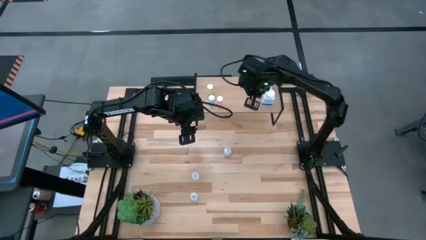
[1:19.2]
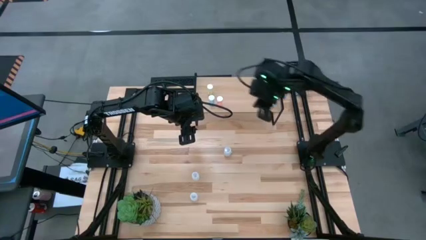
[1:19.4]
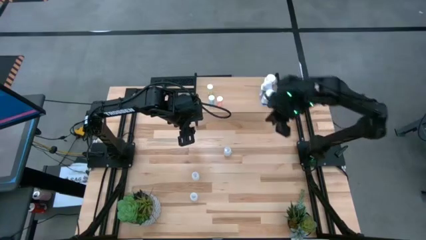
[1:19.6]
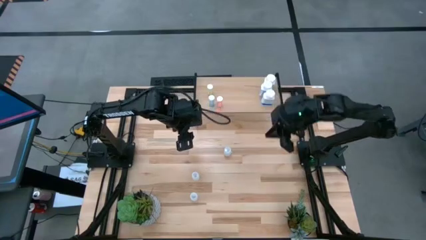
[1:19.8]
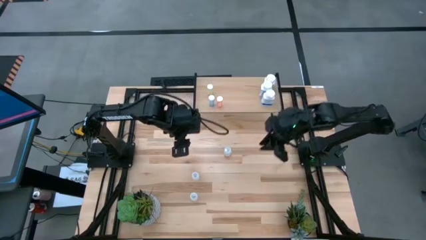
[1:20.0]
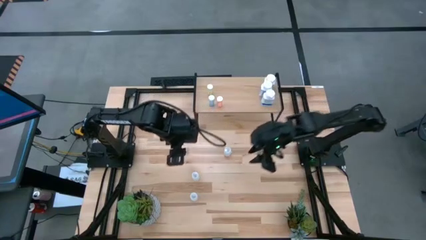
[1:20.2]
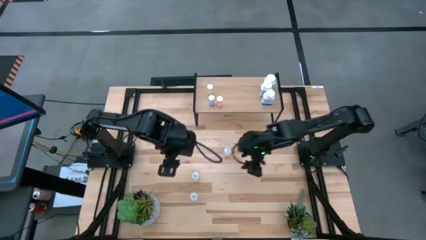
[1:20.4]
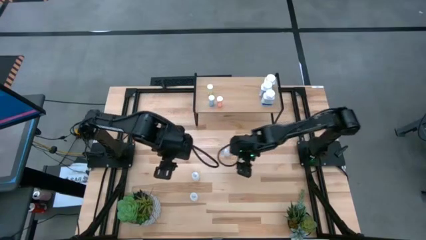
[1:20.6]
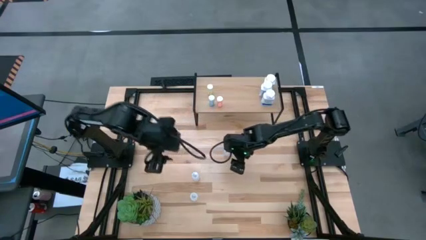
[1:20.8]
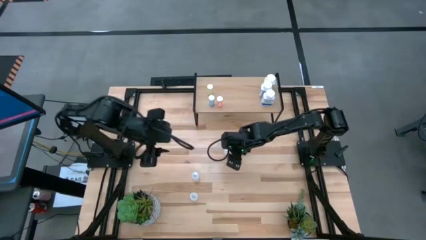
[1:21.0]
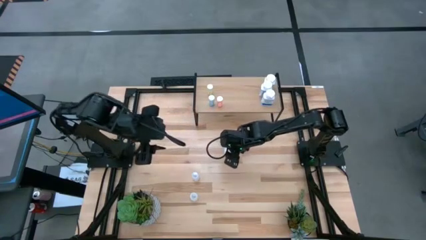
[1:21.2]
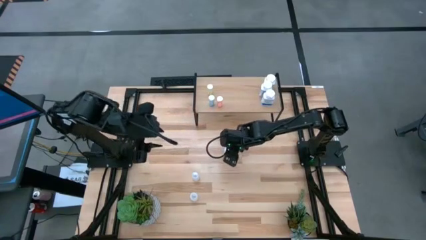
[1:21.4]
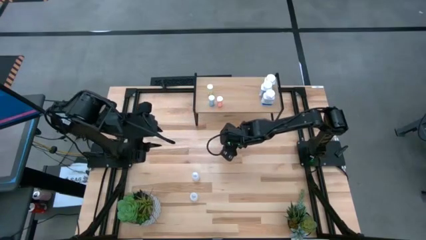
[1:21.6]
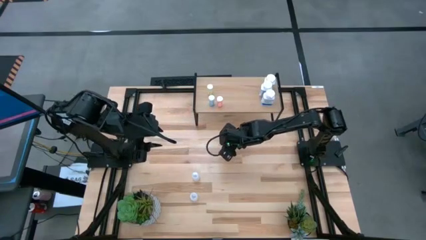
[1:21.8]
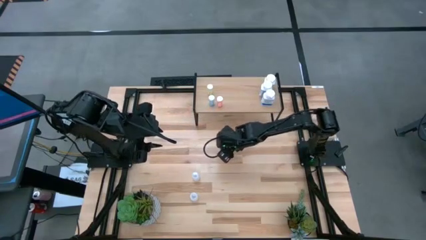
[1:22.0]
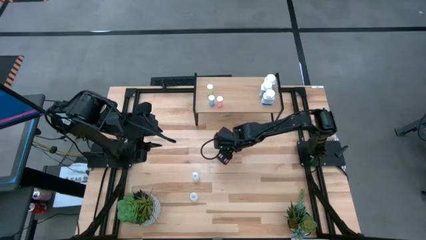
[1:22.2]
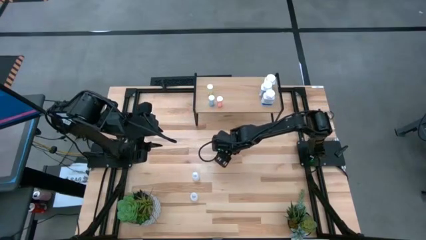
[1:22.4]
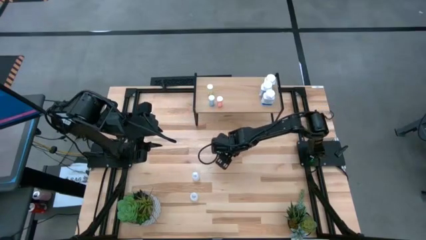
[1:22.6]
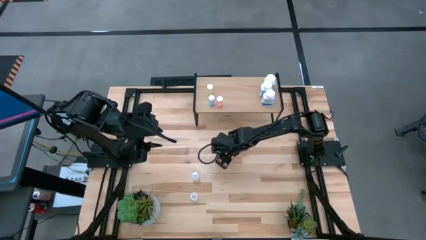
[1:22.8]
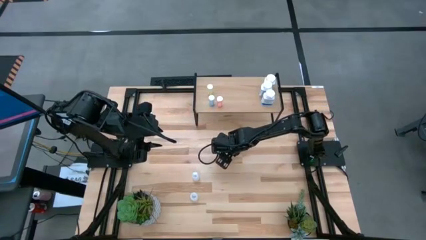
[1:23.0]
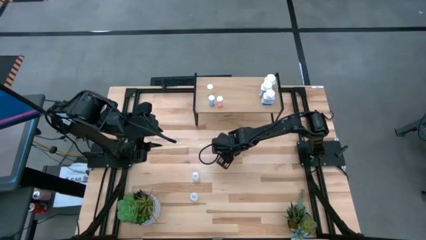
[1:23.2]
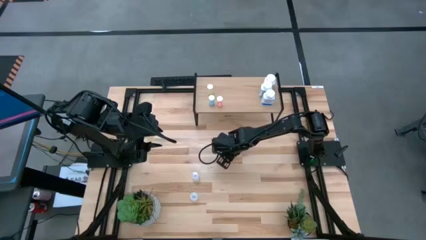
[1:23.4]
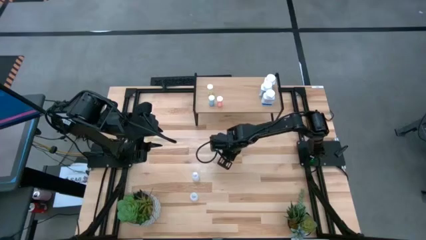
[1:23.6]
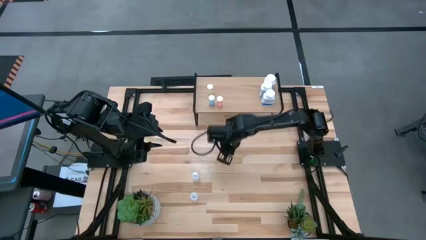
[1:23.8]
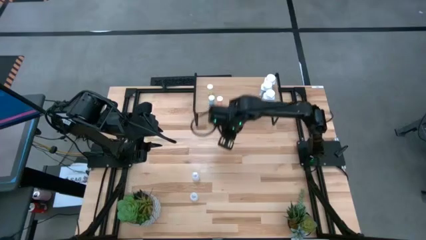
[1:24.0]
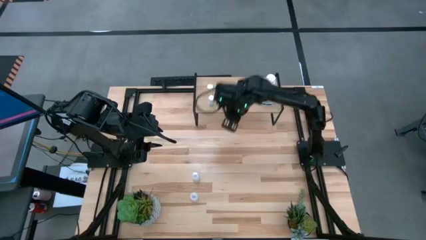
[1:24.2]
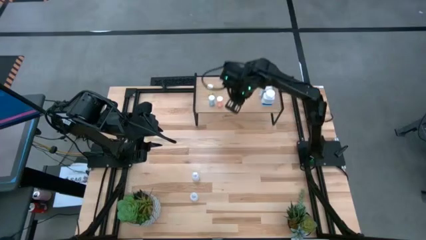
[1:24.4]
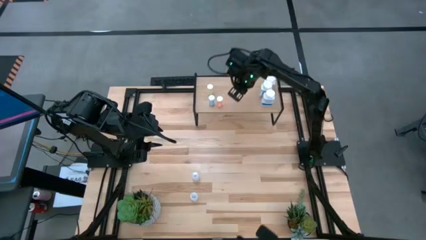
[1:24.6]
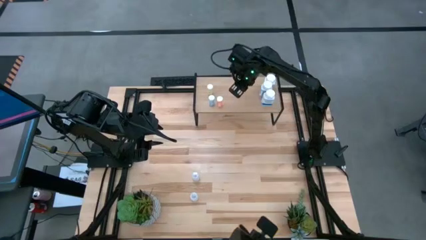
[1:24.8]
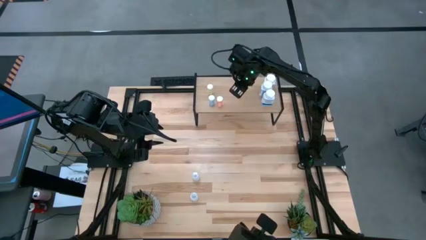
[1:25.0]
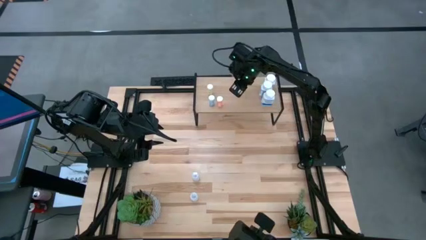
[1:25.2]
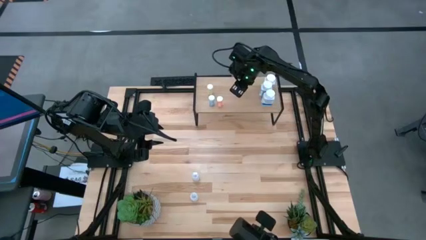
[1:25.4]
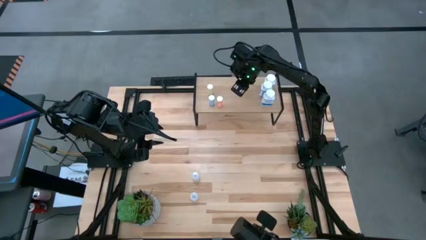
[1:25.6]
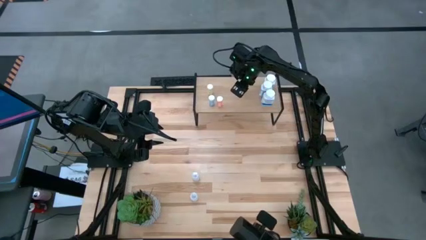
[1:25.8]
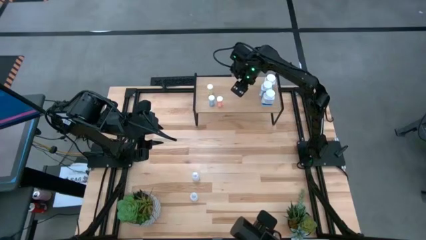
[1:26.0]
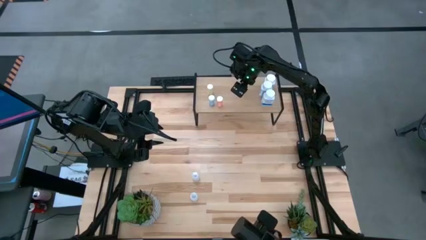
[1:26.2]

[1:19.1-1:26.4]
Task: Pick and place medicine bottles onto shelf by color
Put the top transparent pill bottle on the shelf

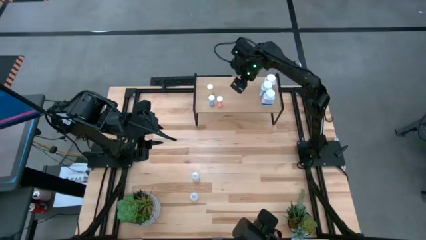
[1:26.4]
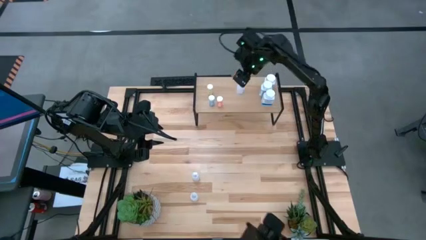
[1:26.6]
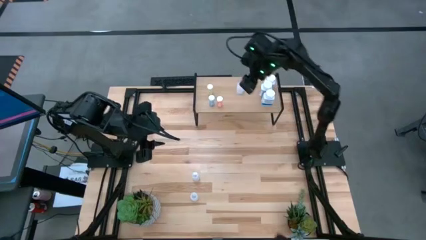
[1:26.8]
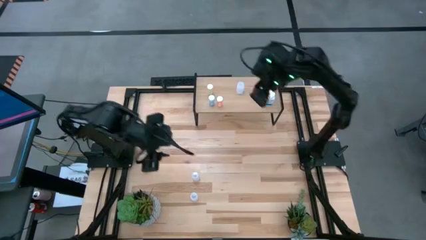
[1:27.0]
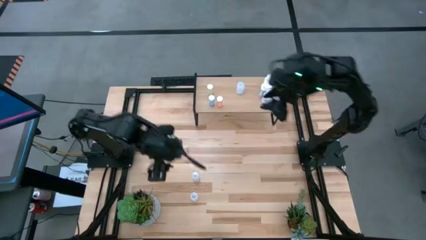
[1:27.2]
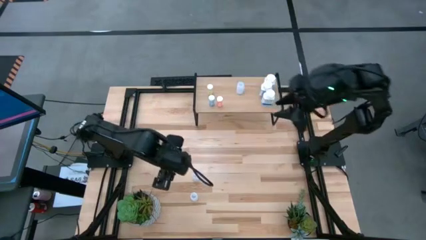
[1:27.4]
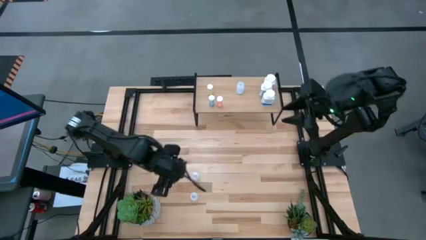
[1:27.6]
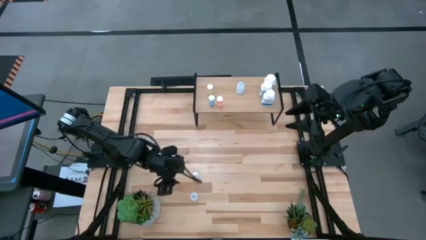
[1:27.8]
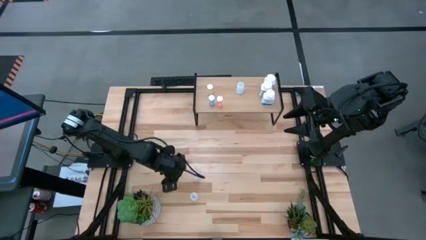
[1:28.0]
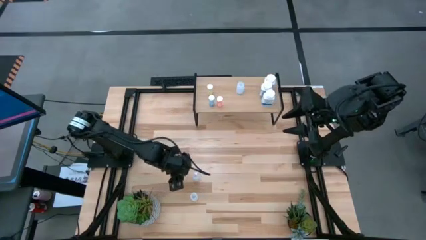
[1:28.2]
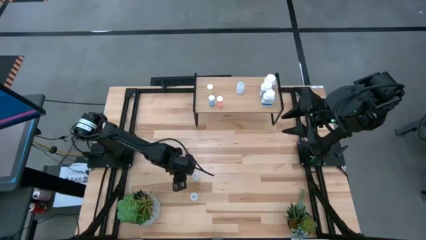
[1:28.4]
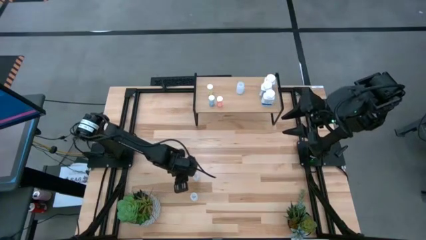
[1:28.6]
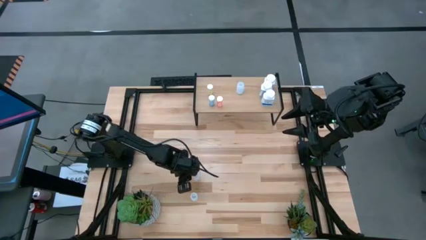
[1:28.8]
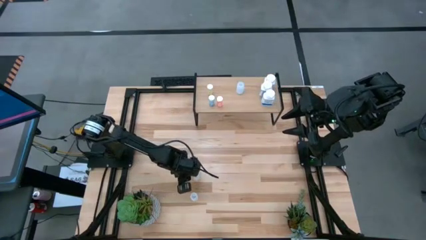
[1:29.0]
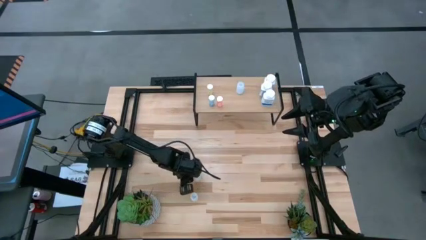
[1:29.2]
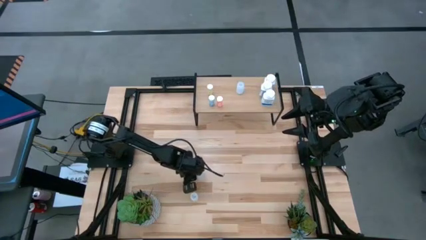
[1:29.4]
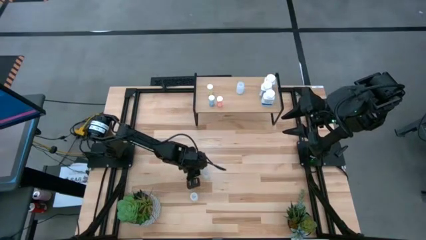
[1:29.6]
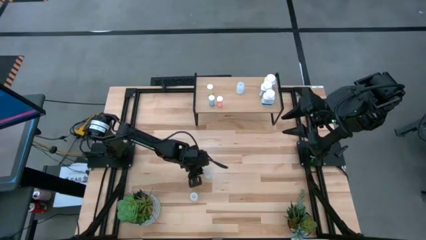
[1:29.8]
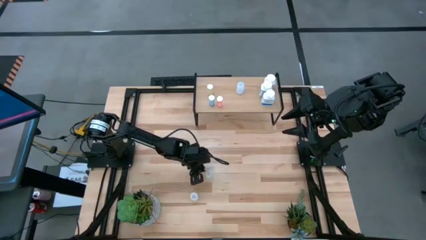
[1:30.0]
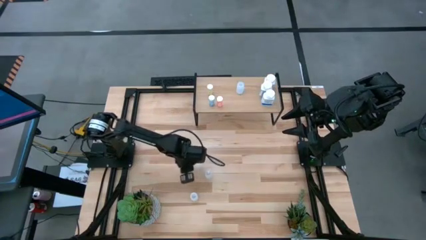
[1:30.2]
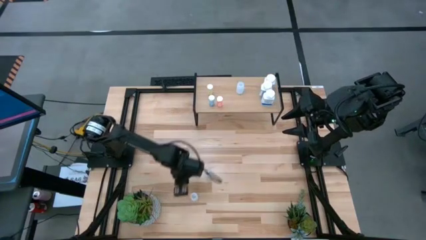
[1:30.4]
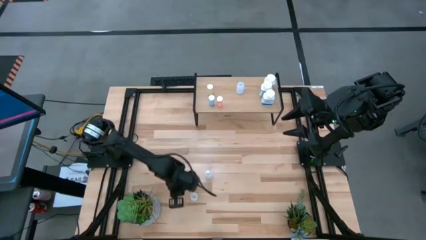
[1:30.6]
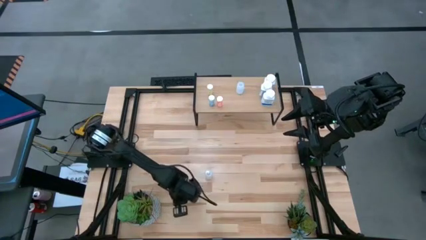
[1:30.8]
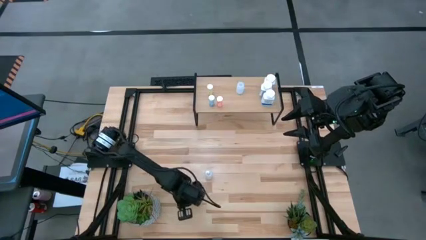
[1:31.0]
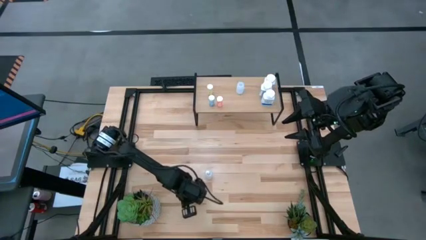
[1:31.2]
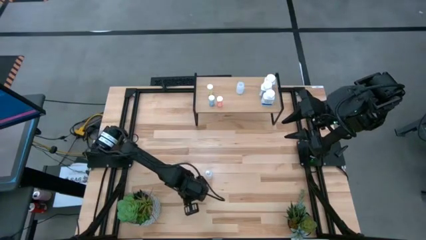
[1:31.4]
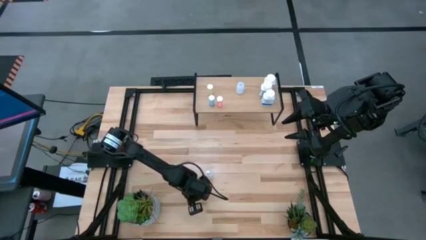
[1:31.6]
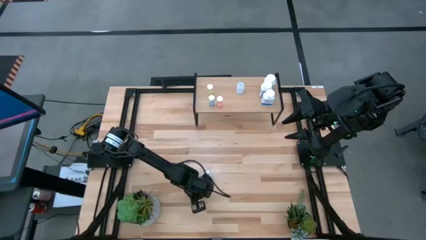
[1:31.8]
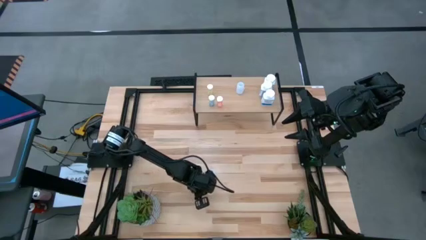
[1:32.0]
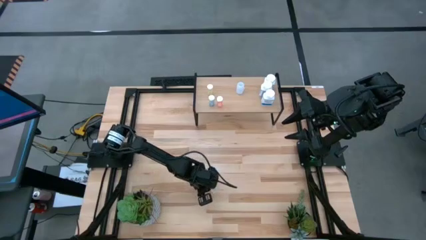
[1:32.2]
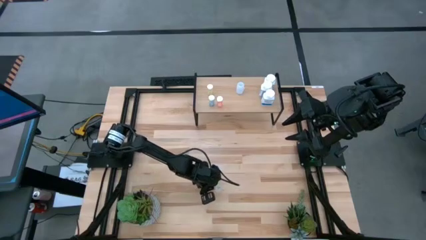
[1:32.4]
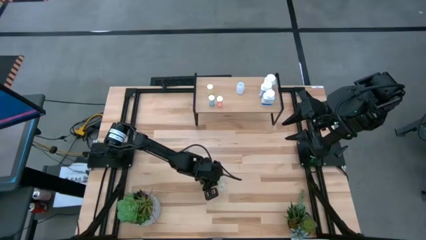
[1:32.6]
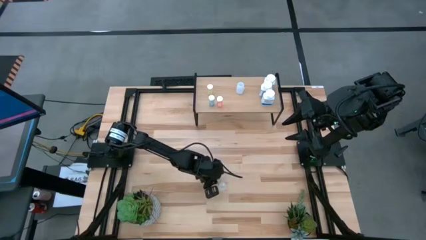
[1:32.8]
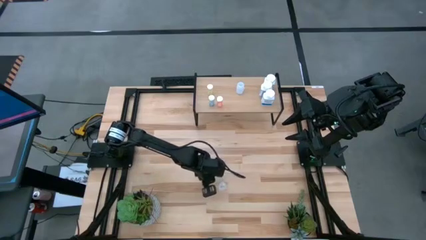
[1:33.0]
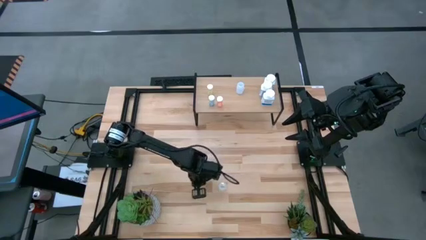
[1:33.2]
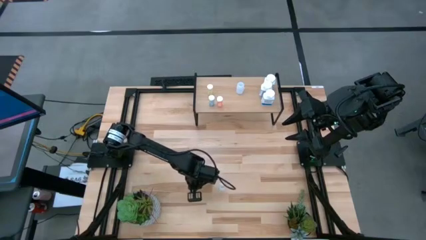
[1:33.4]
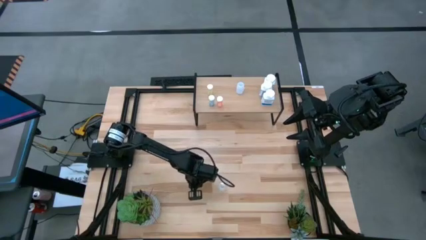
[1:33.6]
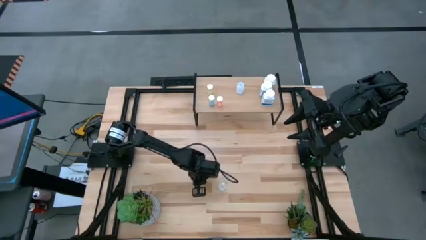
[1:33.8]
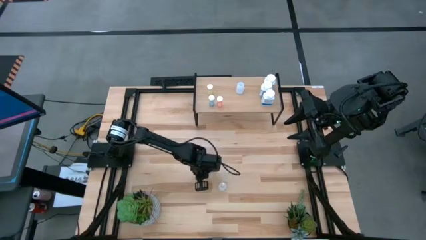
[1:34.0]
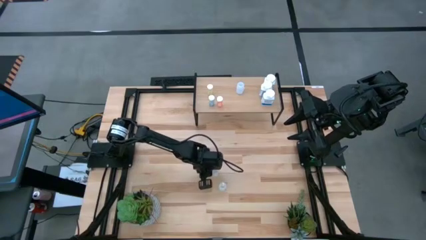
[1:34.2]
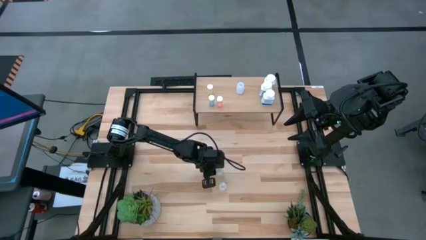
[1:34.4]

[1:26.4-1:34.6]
Move the transparent pill bottles to the center of the table
